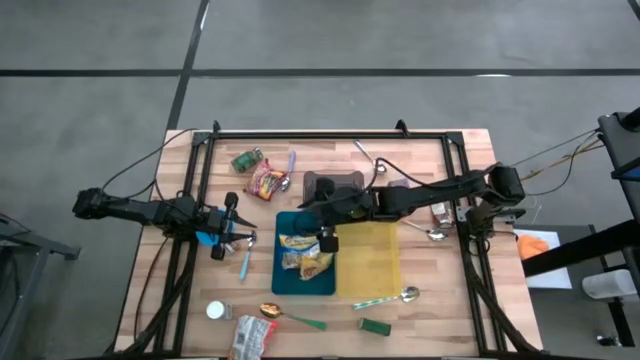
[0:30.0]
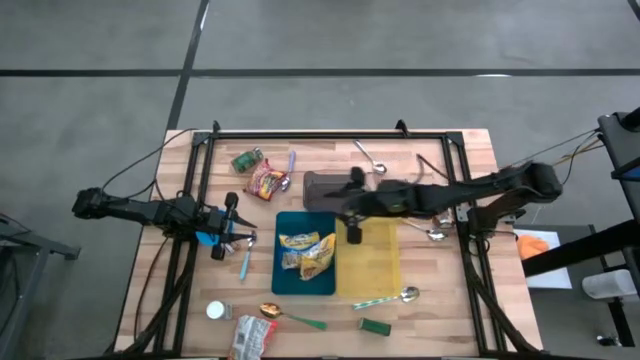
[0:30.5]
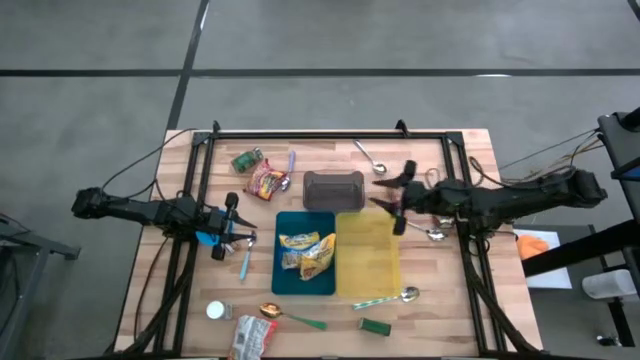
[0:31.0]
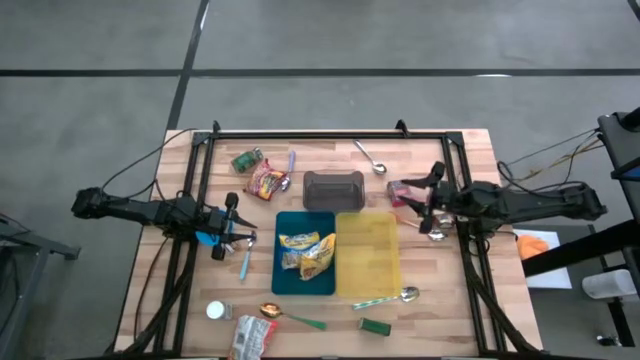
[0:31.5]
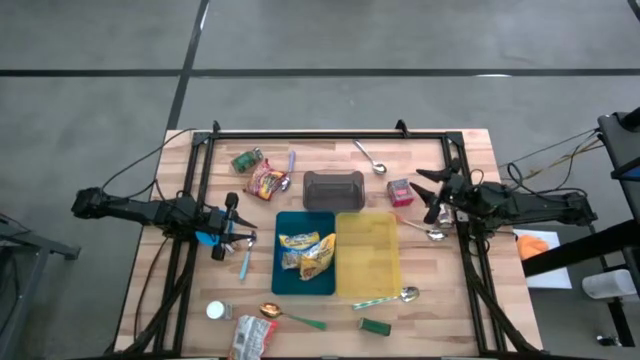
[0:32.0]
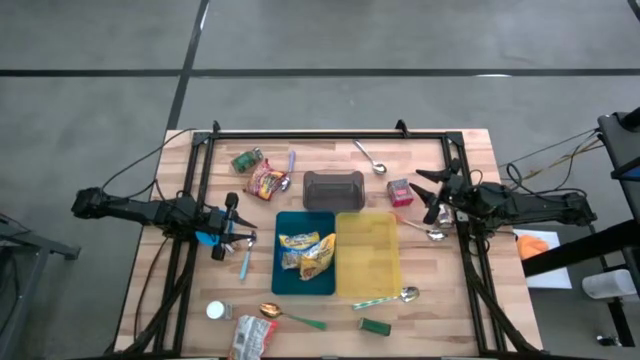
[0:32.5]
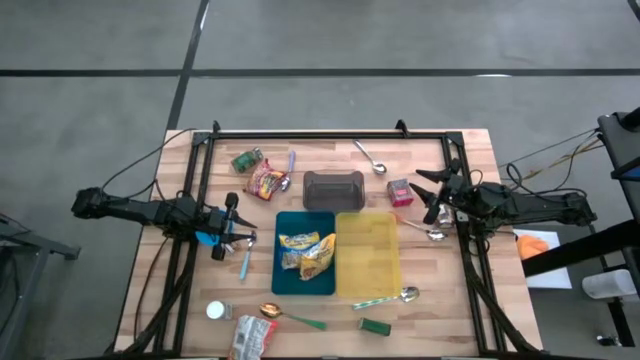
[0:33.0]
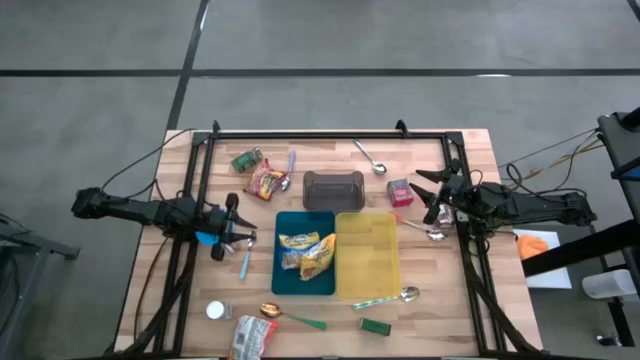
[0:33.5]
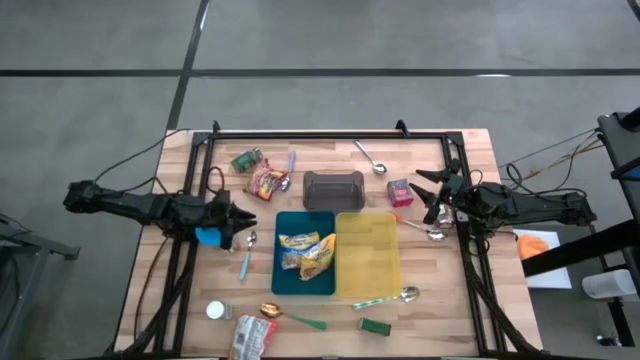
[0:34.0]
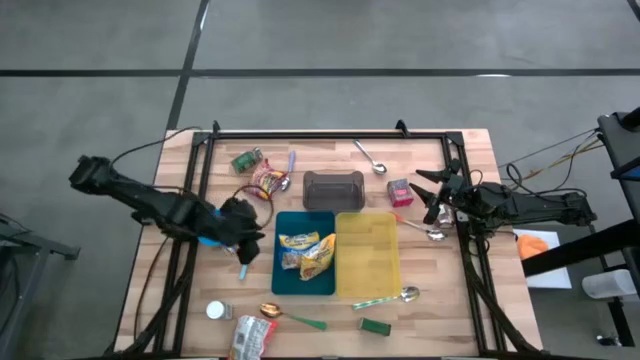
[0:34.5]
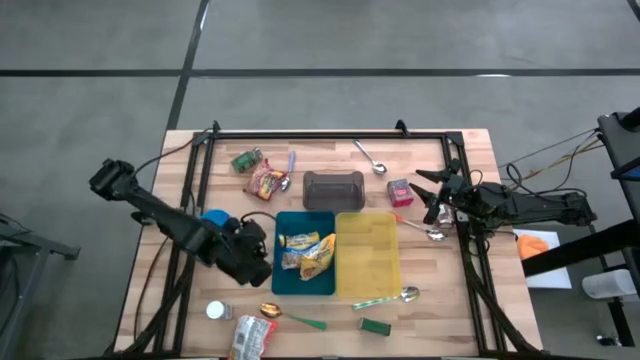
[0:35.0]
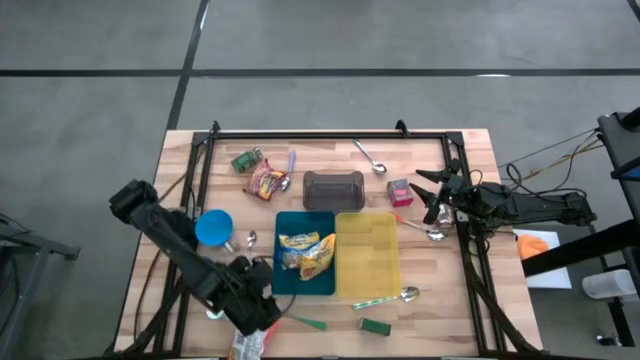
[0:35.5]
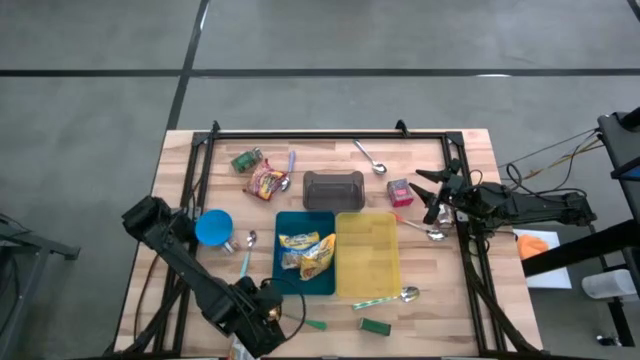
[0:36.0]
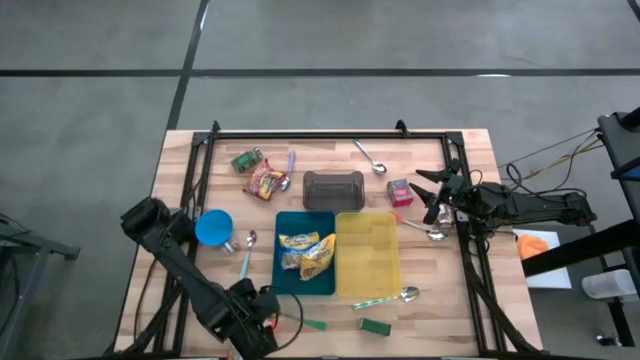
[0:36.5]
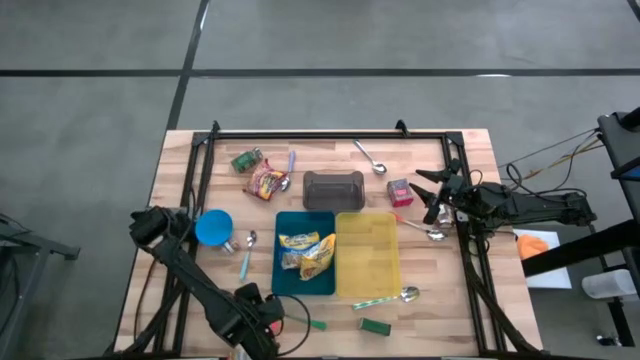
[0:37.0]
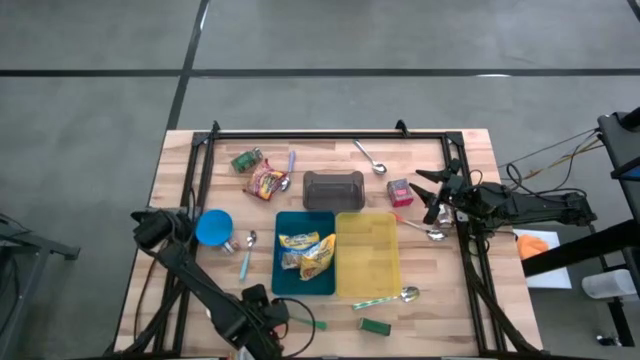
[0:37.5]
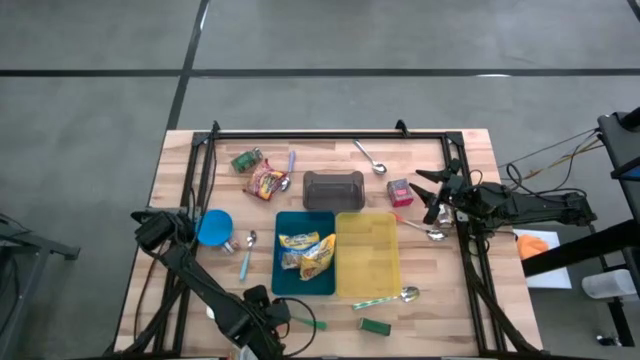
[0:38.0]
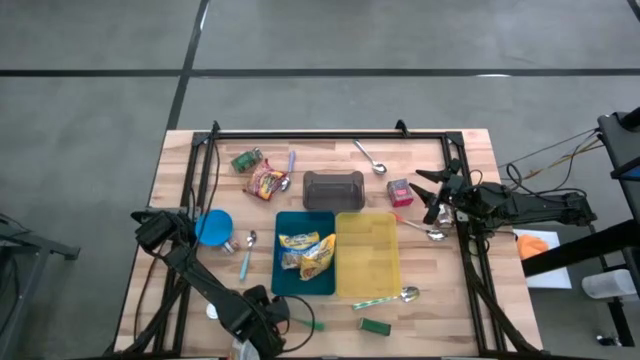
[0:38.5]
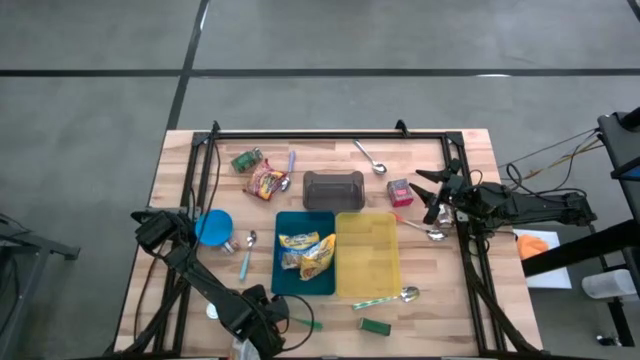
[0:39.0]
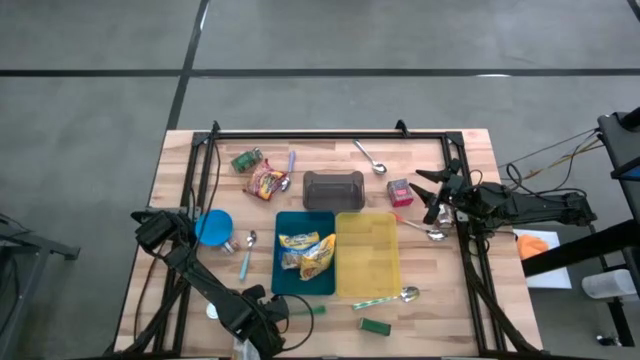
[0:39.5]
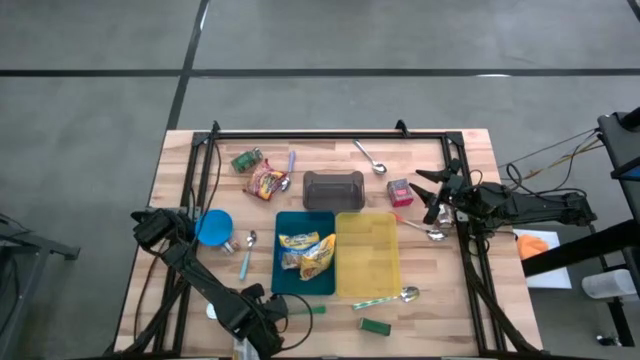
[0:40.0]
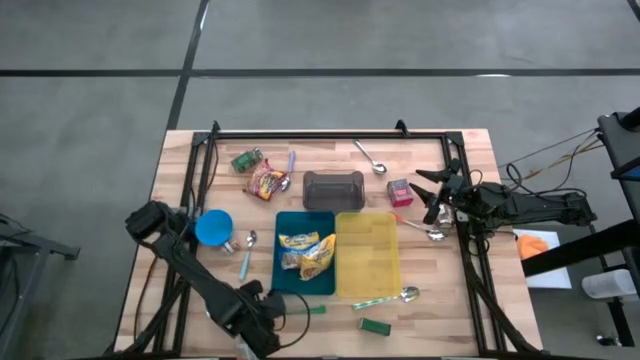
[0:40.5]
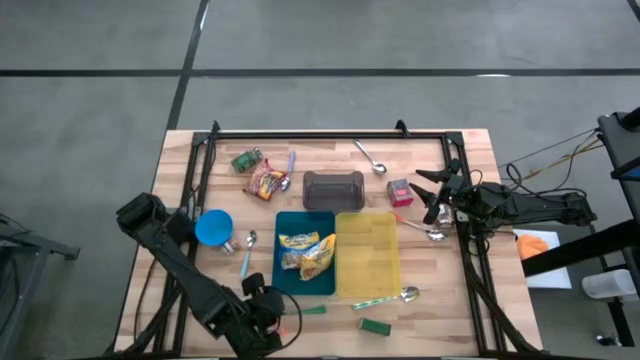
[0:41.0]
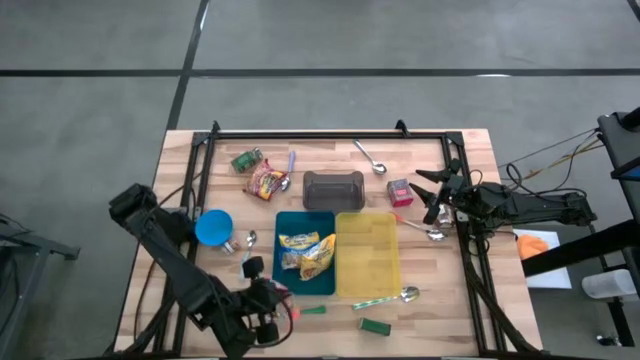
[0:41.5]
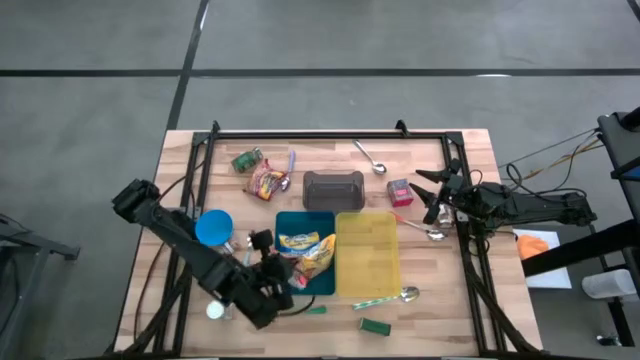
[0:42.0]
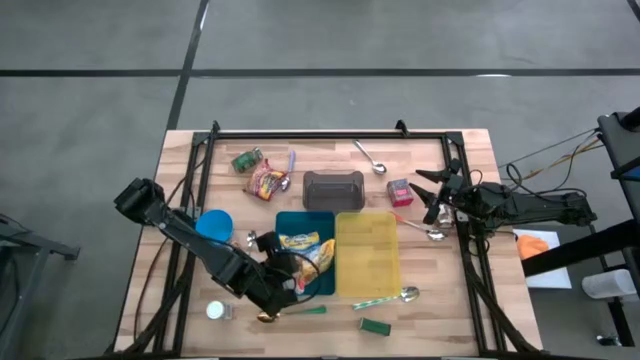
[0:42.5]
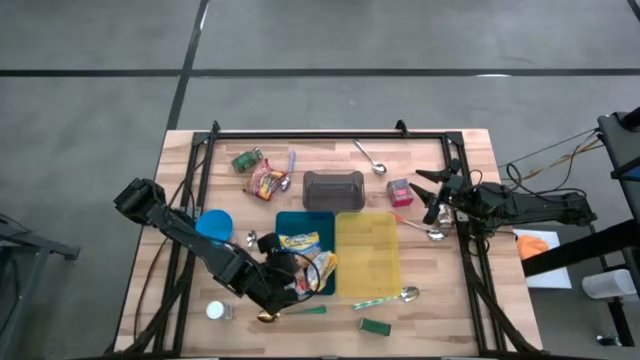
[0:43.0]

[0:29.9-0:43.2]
Put the orange noodle pack into the blue bin

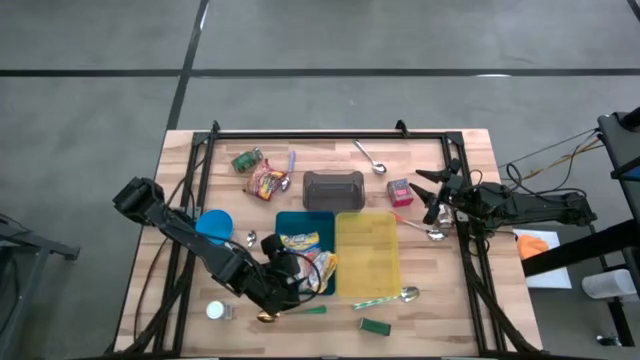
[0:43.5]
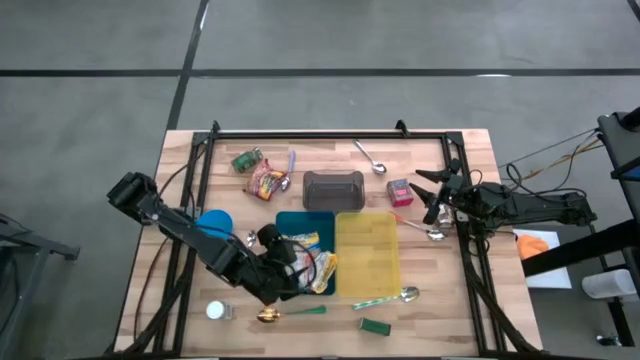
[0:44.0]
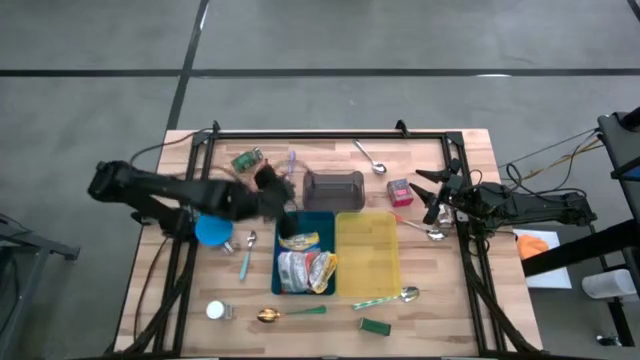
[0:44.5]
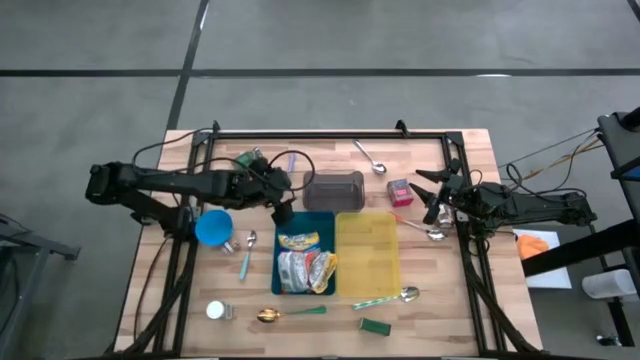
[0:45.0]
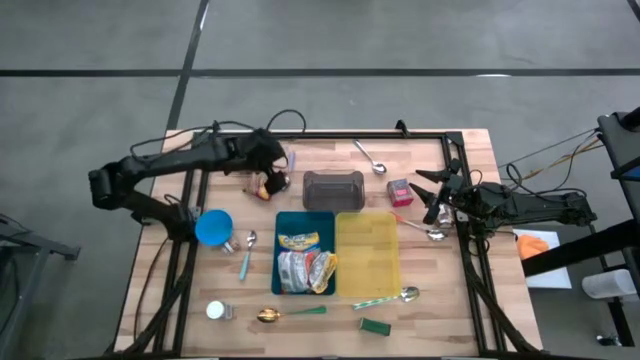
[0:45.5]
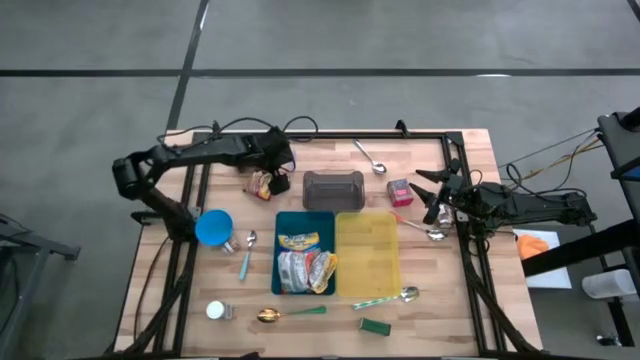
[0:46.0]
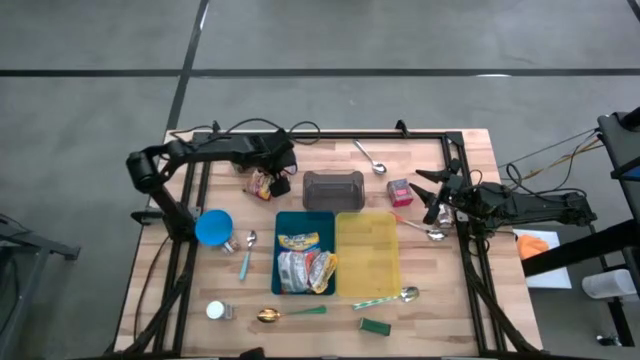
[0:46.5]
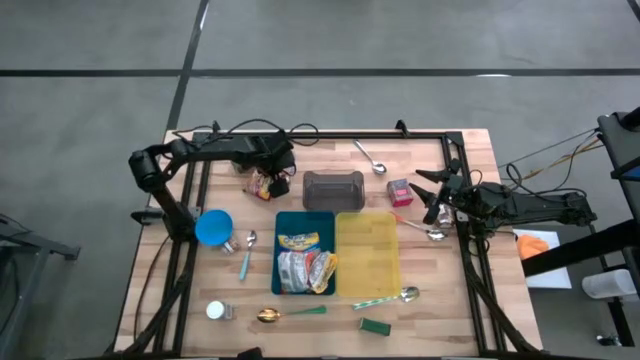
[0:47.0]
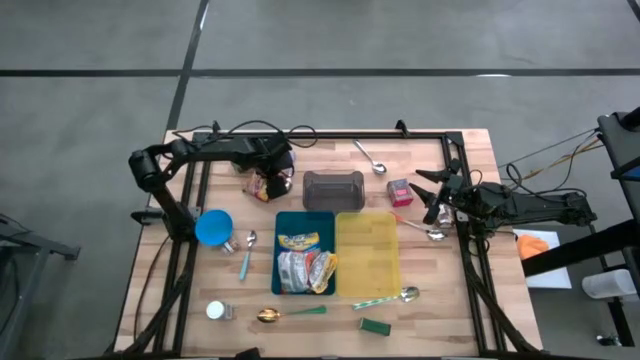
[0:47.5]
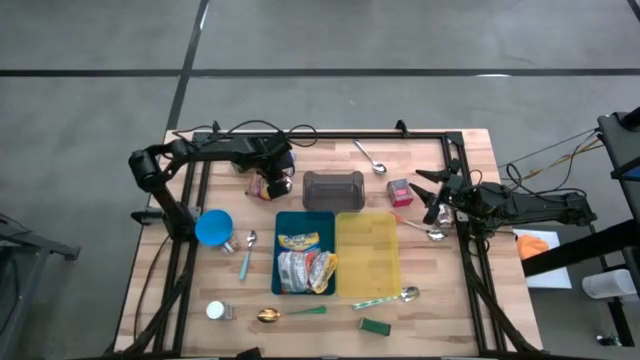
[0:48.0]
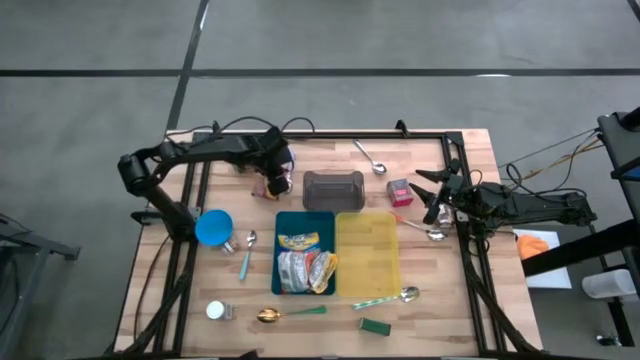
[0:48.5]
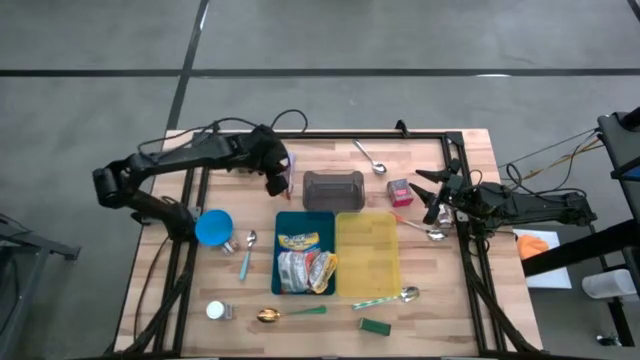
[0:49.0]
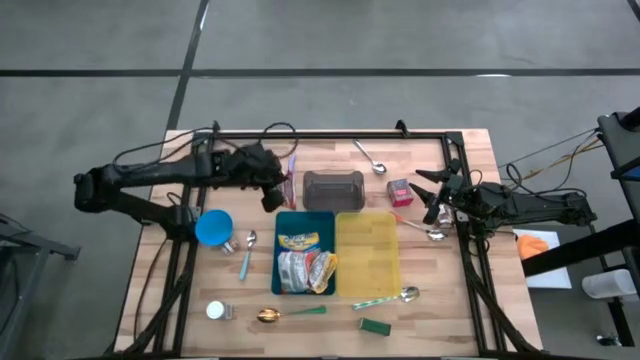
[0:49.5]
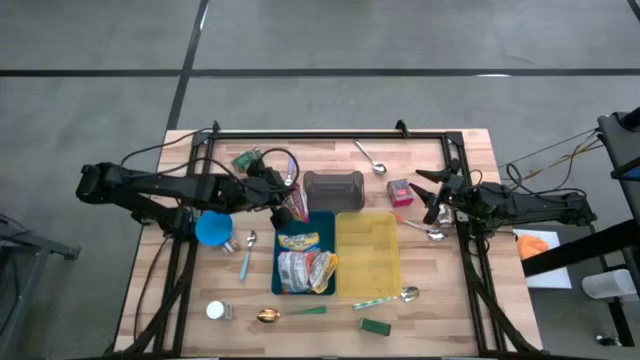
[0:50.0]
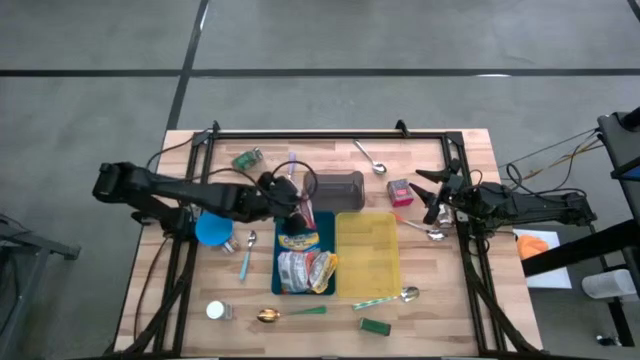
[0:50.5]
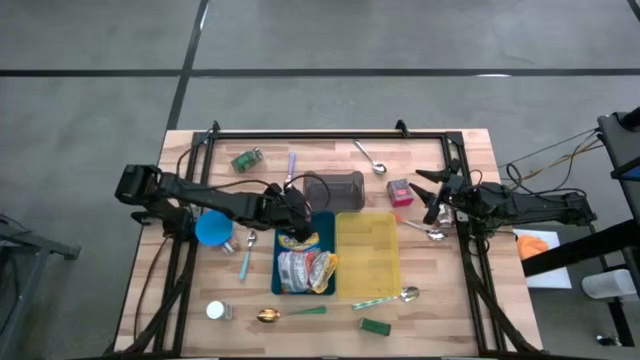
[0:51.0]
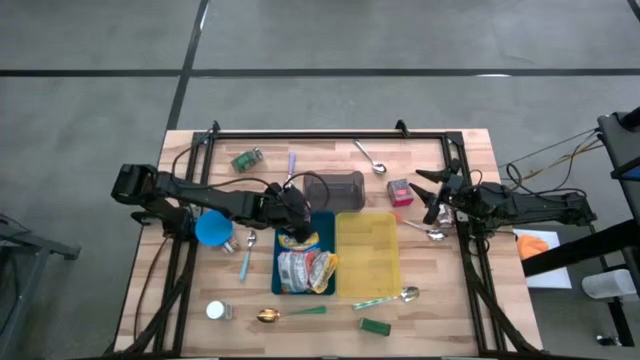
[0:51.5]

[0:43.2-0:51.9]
Put the red noodle pack into the blue bin
